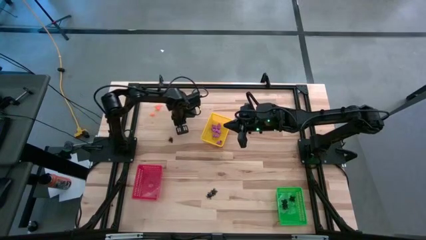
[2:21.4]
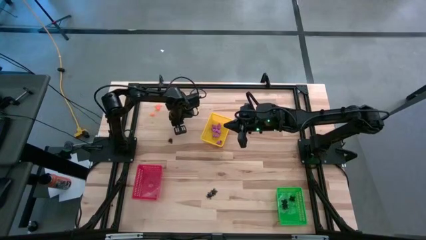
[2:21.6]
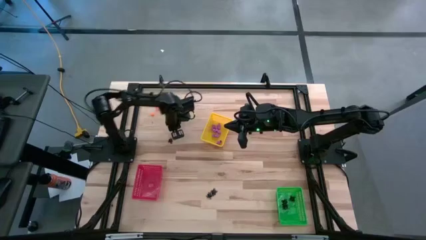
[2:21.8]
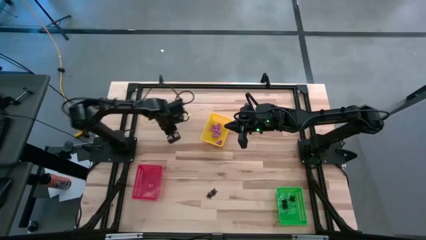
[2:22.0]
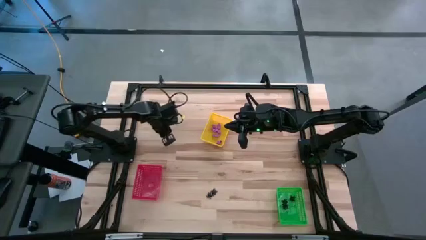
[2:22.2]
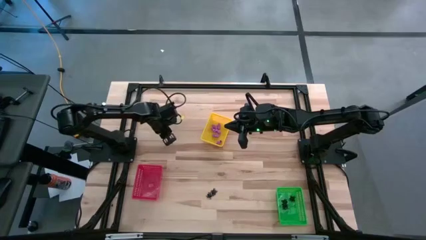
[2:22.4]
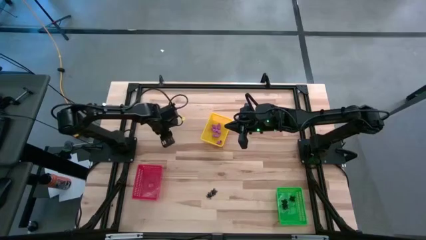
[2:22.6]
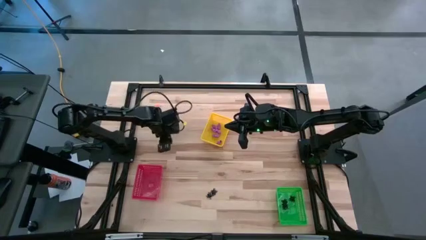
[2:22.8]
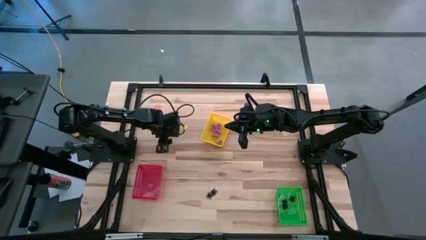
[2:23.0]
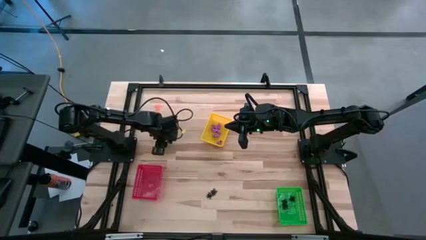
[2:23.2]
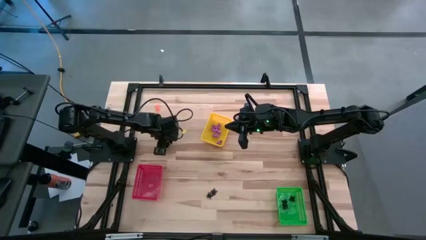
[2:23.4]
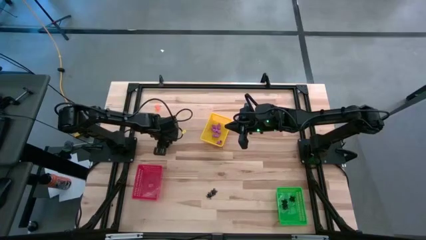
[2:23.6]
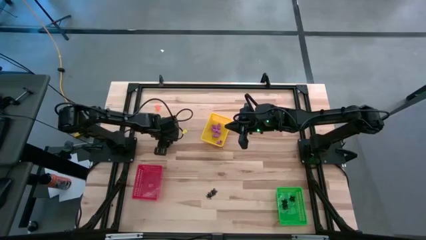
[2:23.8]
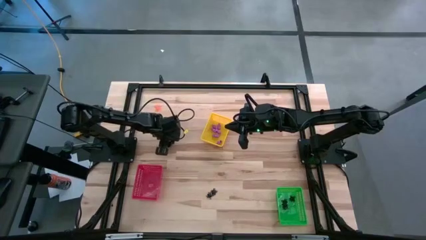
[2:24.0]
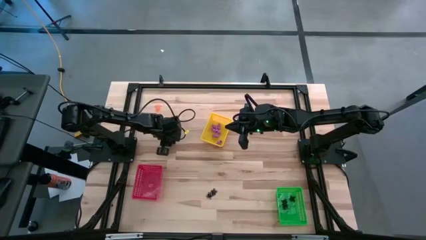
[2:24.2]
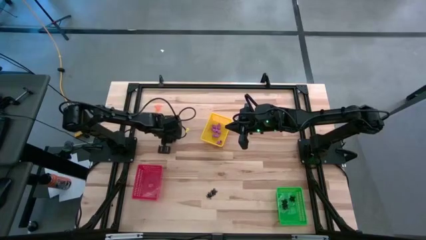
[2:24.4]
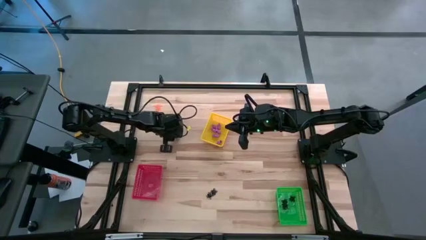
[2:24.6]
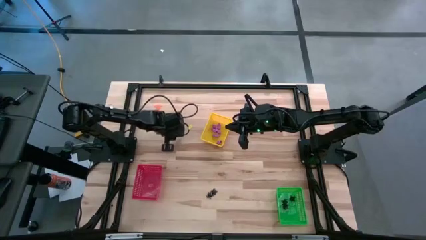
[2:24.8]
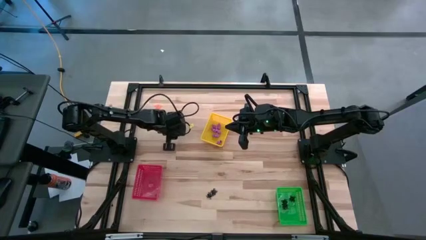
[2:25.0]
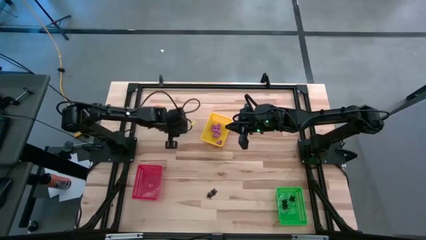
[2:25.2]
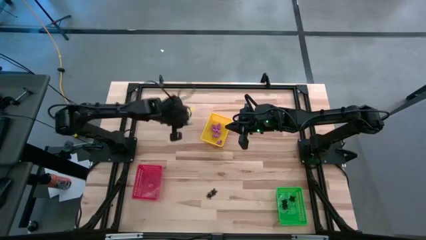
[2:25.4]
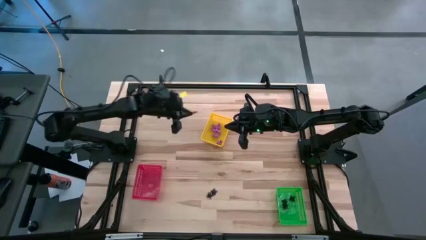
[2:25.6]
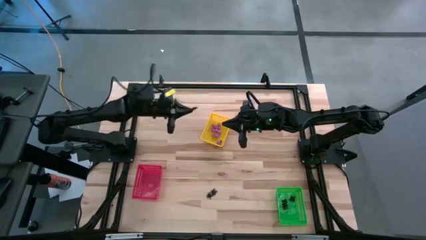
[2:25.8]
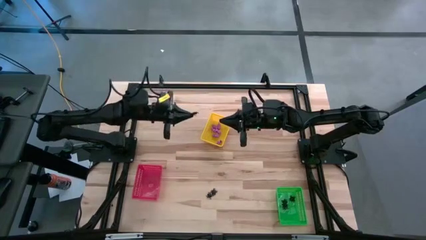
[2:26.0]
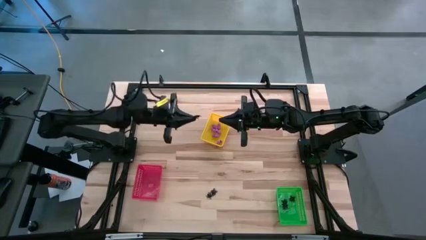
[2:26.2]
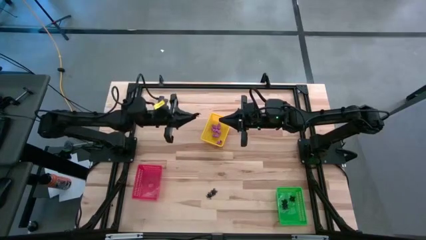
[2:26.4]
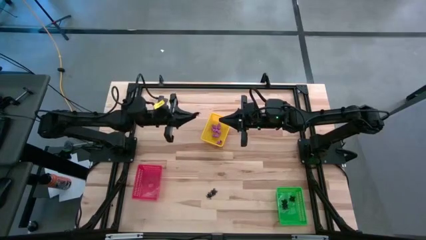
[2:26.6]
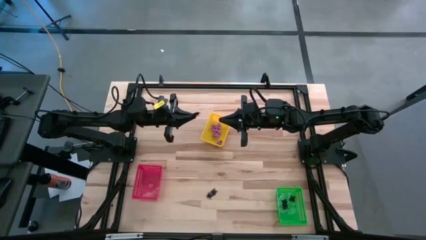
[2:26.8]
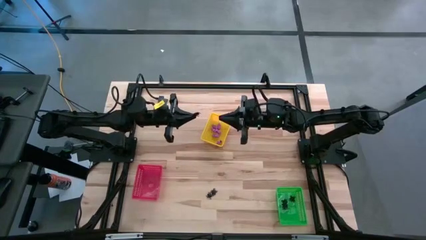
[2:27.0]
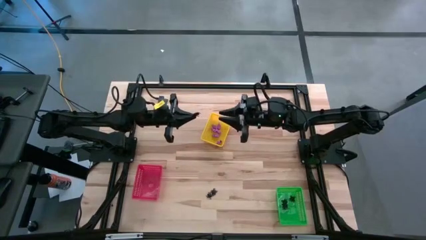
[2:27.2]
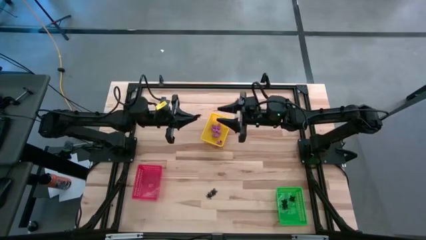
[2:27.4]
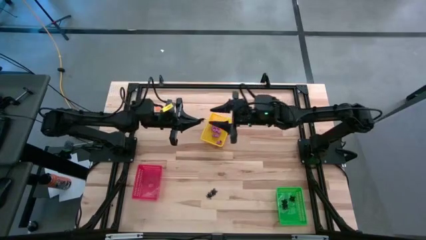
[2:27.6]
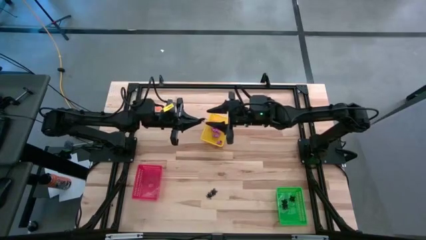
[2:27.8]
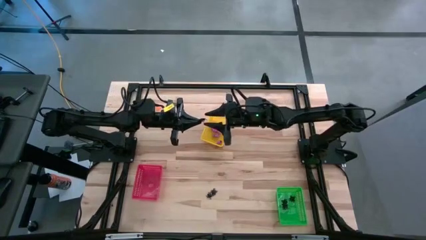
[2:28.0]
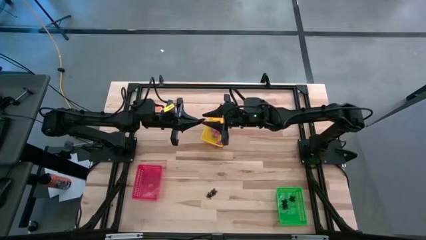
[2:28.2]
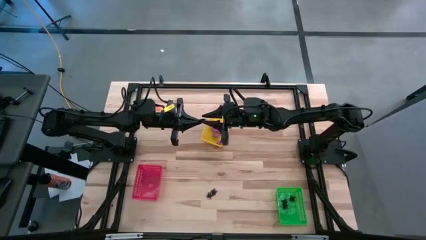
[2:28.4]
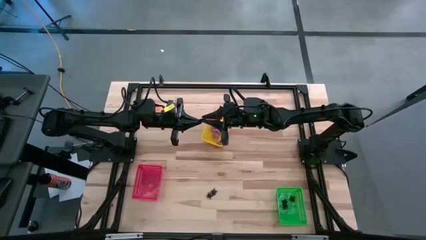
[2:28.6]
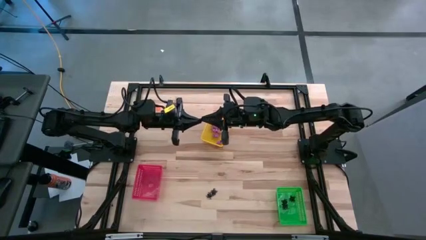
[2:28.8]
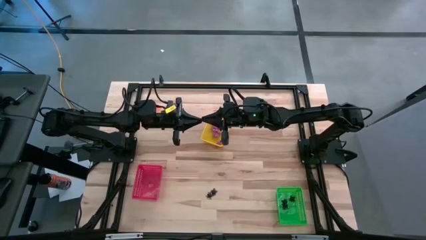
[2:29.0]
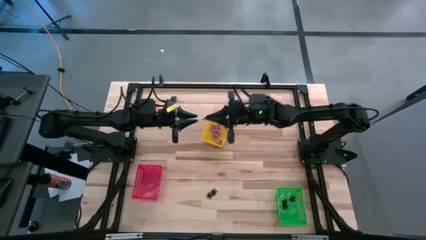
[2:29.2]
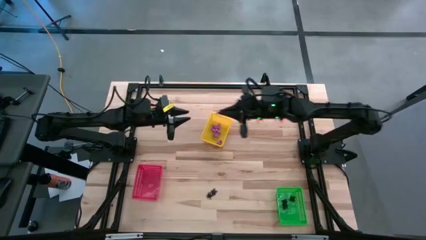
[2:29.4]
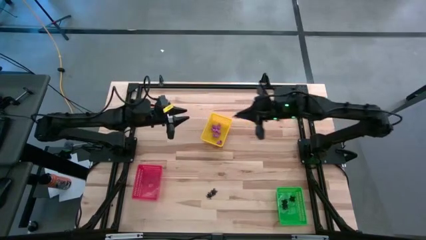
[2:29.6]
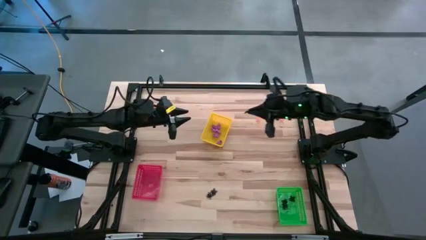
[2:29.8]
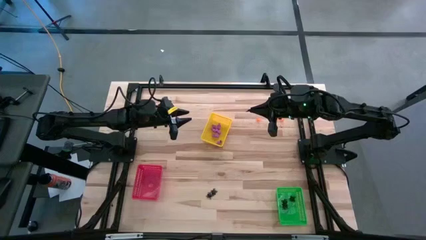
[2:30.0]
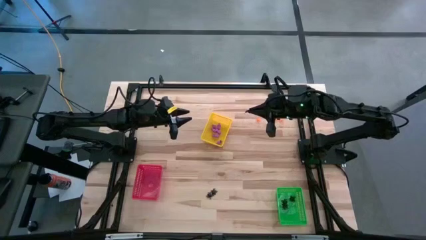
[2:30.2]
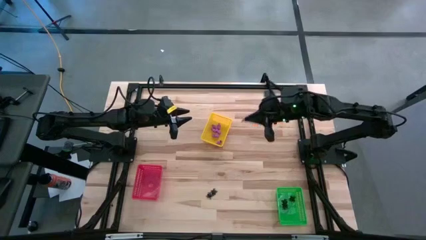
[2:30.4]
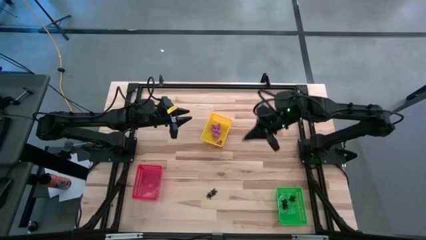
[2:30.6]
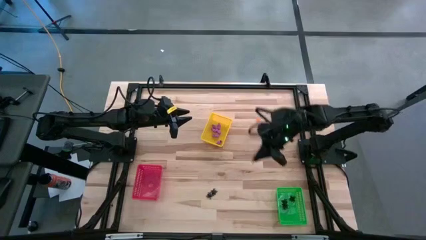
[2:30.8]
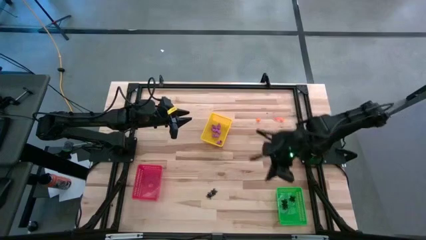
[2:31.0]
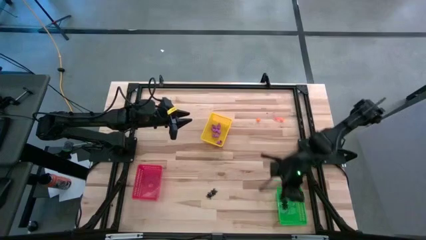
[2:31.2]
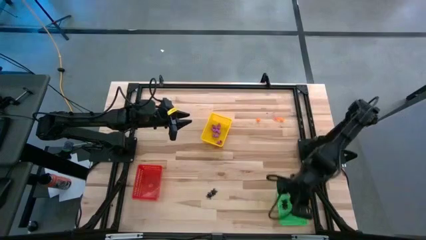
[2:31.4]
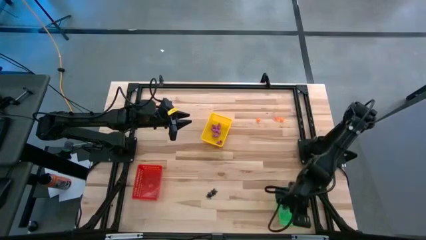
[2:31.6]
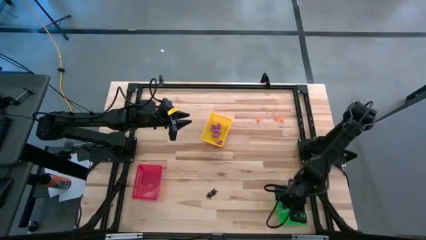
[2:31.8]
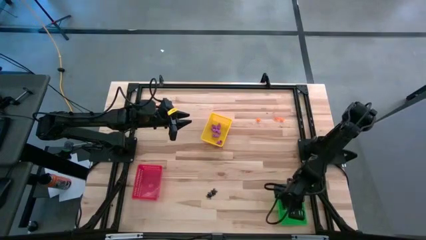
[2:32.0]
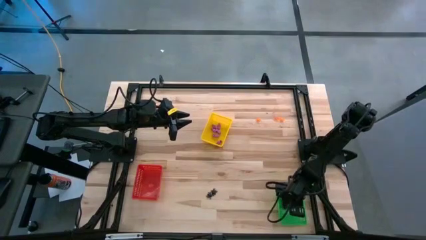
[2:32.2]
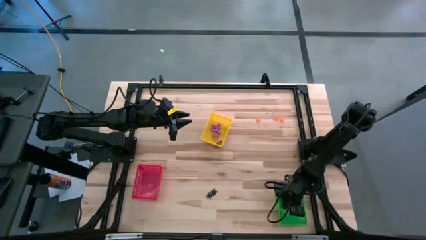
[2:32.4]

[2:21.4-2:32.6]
Task: Sort Halloween decoration
Put the top black spider toy into the green bin
